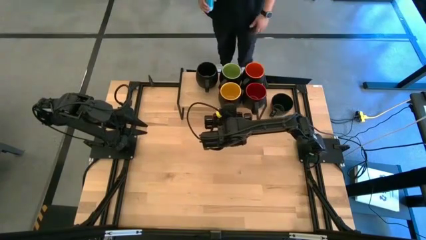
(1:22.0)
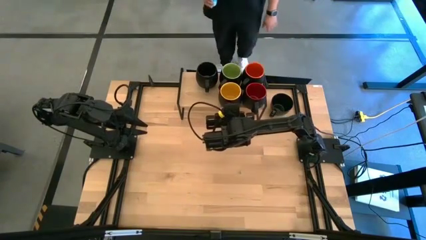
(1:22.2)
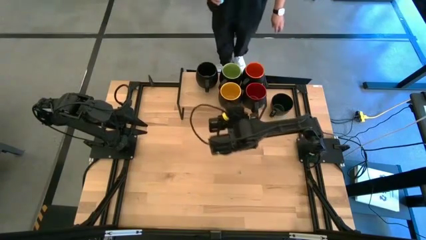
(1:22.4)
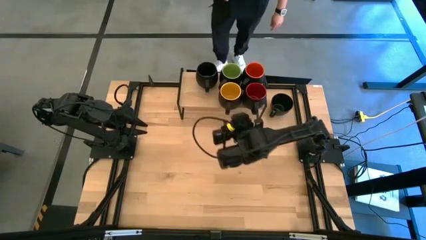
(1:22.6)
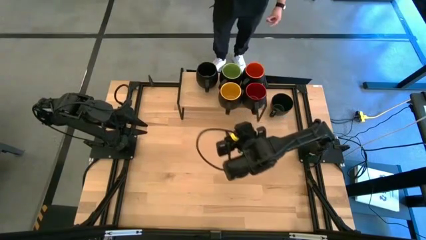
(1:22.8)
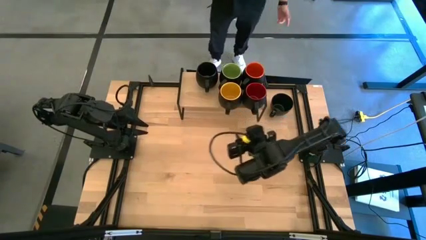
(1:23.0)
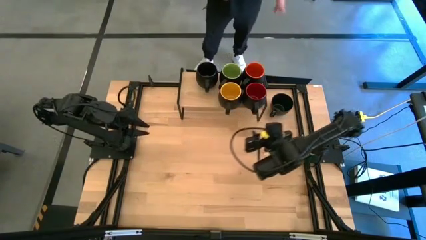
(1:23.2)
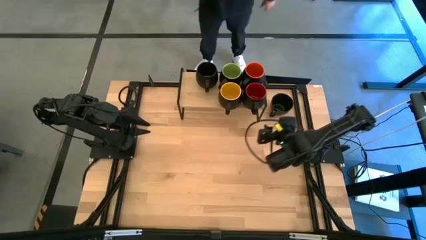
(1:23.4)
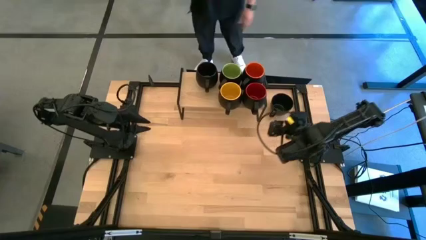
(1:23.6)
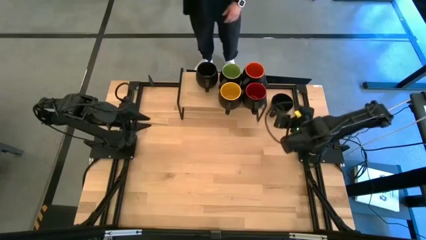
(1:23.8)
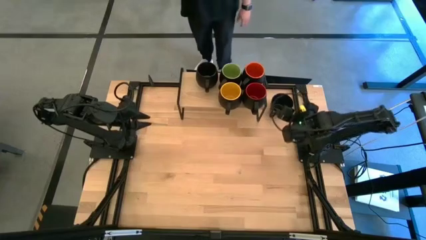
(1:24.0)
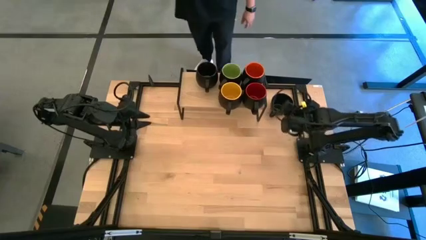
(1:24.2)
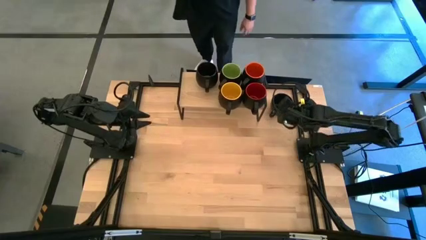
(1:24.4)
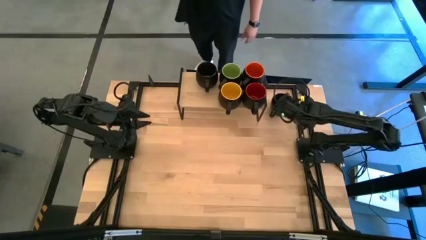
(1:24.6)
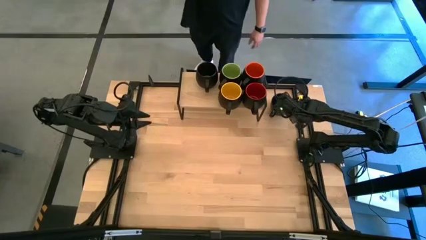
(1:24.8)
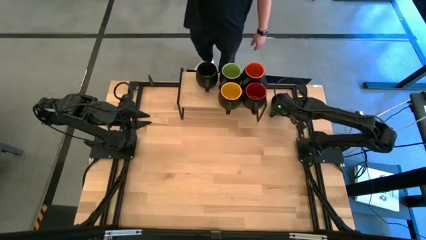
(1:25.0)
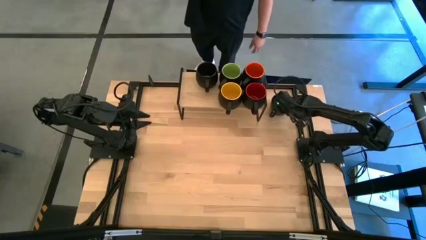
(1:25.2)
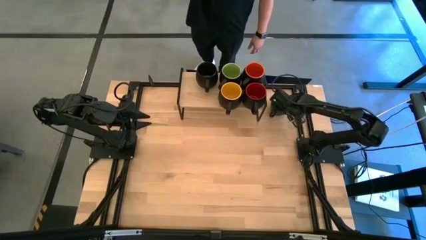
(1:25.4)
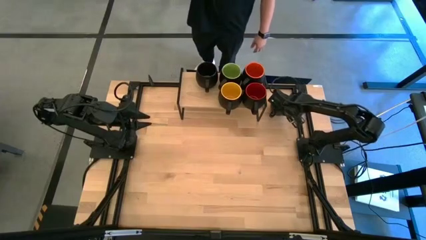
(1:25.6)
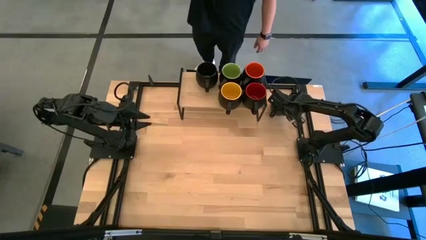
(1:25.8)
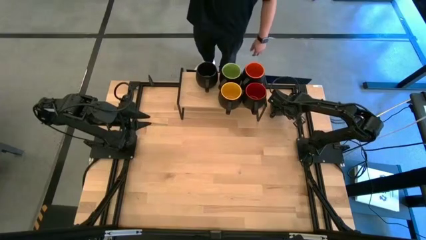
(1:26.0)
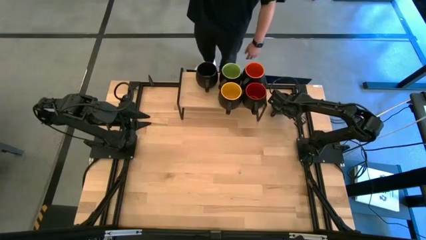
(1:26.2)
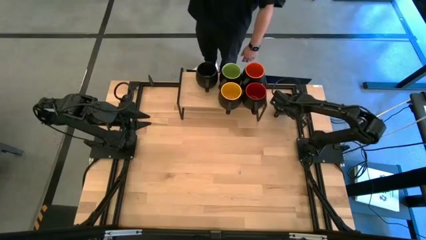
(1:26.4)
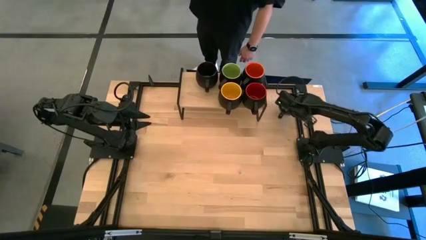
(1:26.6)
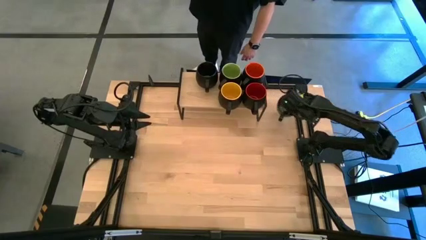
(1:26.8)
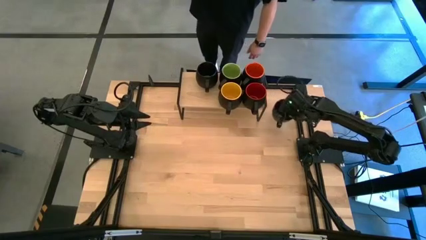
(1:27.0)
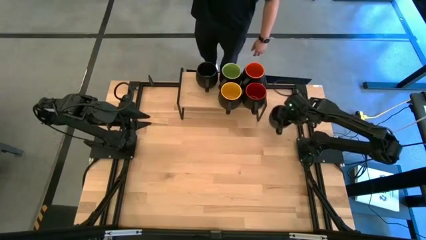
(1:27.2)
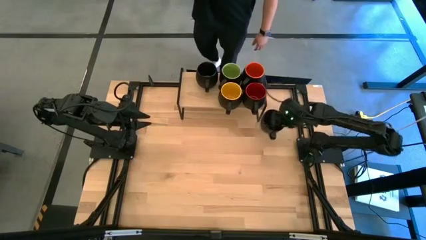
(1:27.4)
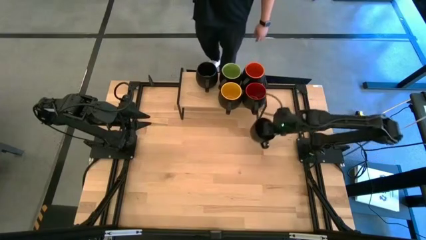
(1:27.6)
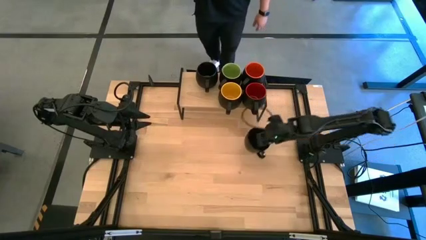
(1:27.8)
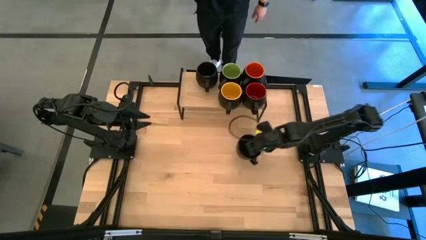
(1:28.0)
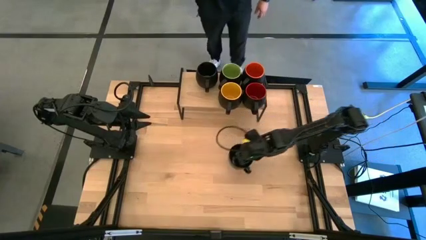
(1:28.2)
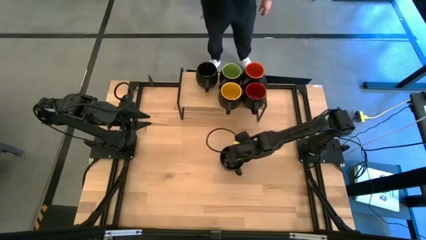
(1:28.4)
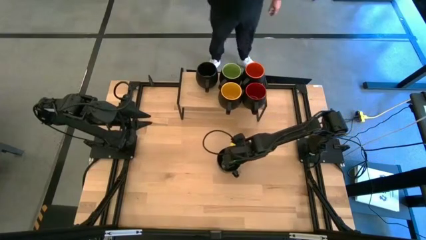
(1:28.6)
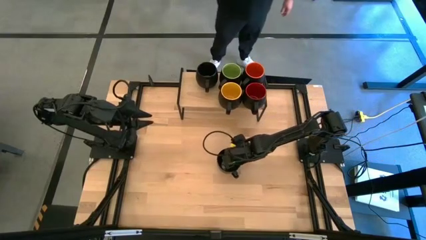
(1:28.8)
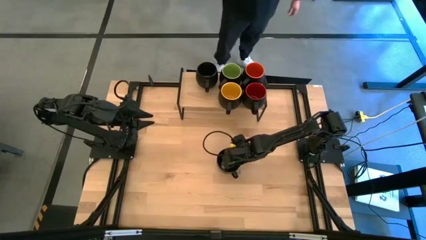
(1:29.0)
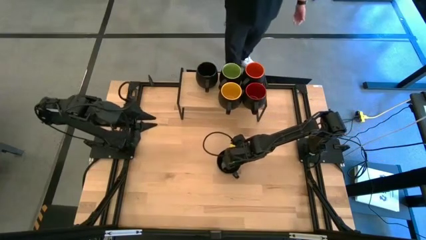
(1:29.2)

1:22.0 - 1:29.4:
Task: Place coffee mugs
Move the black mug to the center of the table

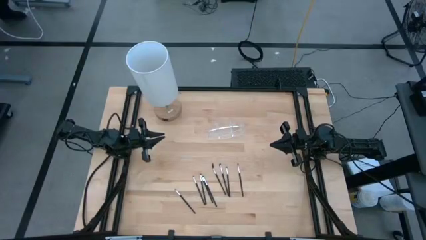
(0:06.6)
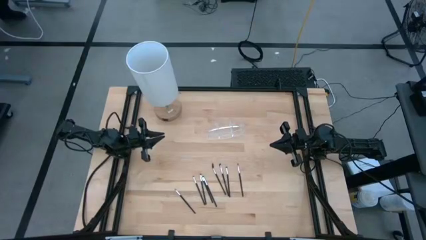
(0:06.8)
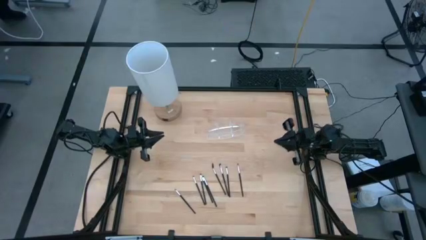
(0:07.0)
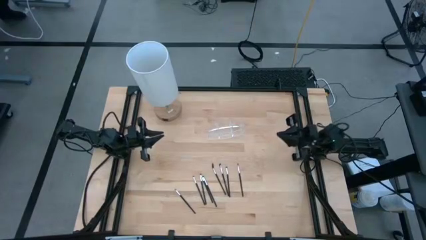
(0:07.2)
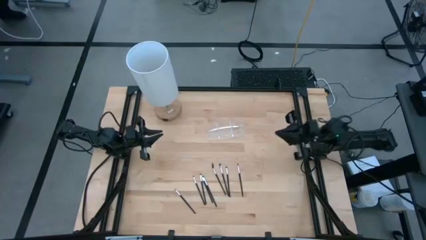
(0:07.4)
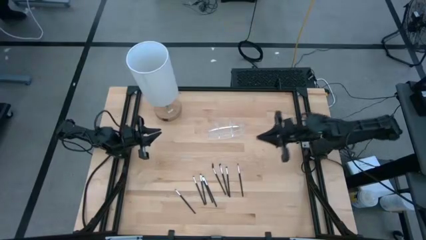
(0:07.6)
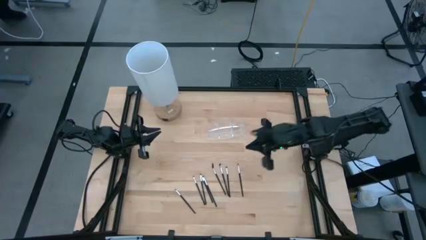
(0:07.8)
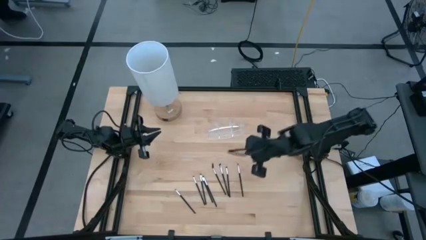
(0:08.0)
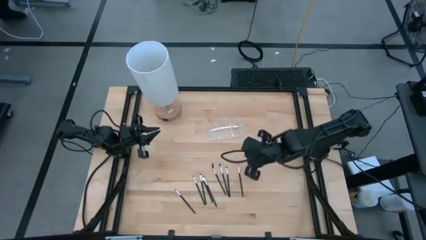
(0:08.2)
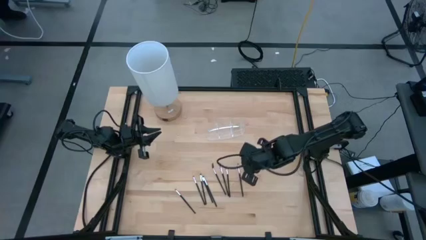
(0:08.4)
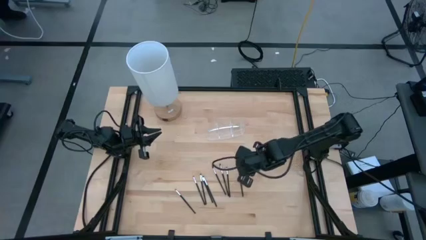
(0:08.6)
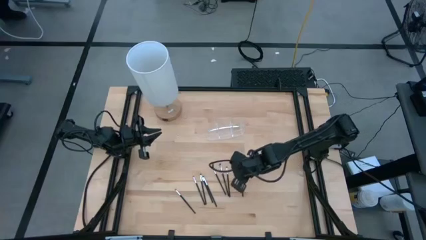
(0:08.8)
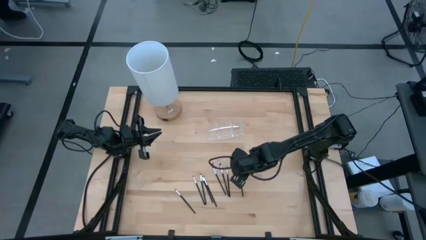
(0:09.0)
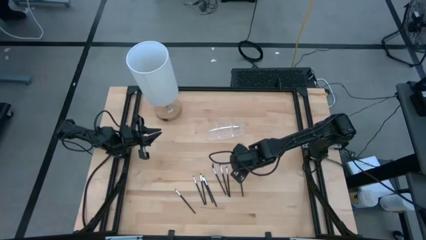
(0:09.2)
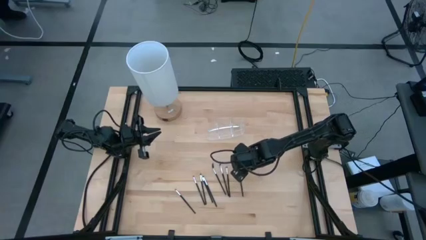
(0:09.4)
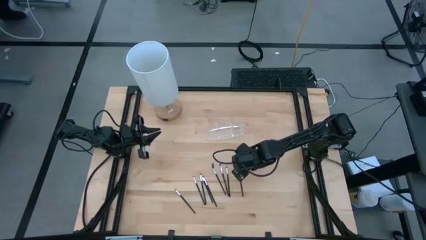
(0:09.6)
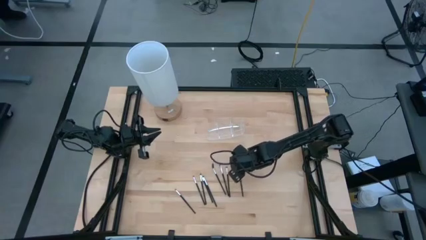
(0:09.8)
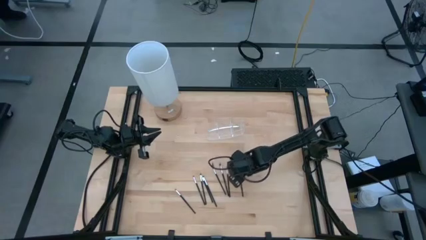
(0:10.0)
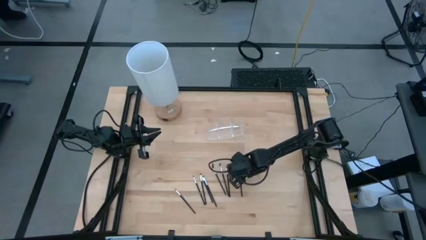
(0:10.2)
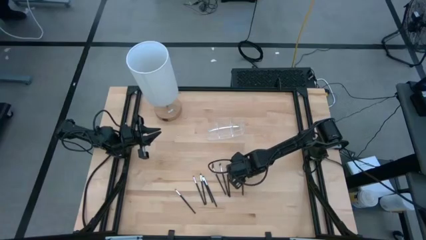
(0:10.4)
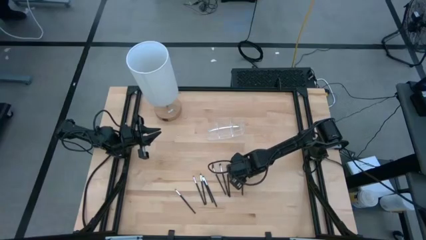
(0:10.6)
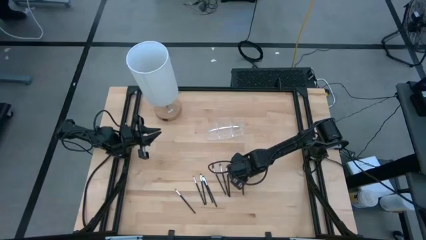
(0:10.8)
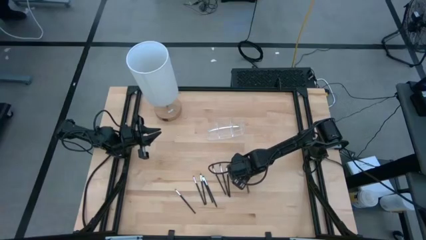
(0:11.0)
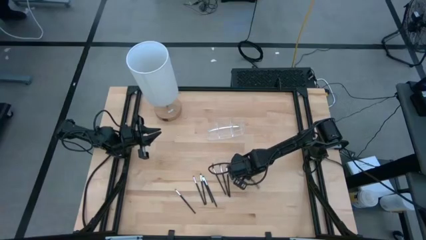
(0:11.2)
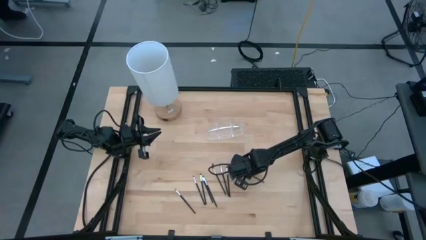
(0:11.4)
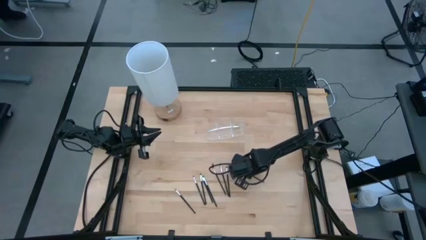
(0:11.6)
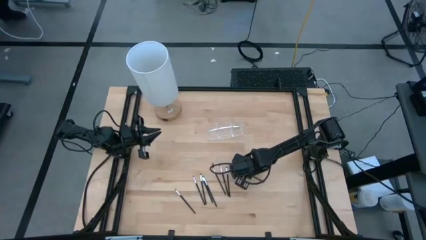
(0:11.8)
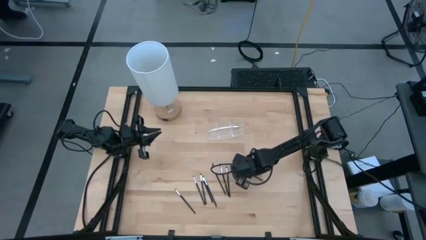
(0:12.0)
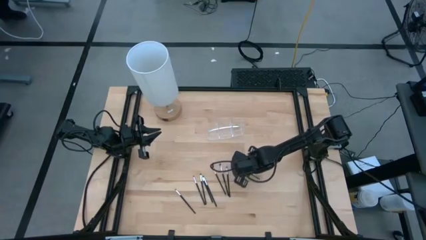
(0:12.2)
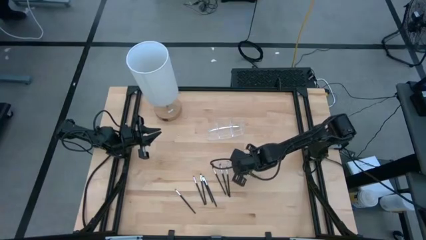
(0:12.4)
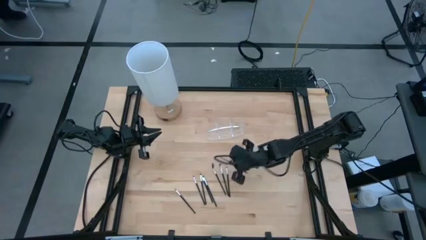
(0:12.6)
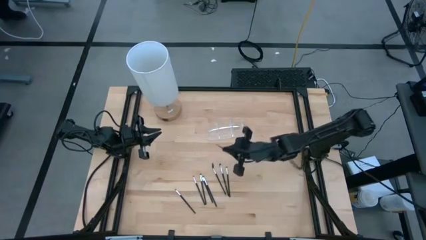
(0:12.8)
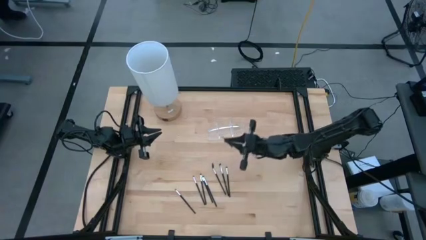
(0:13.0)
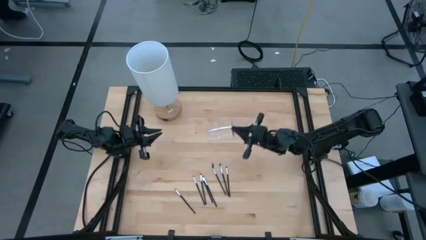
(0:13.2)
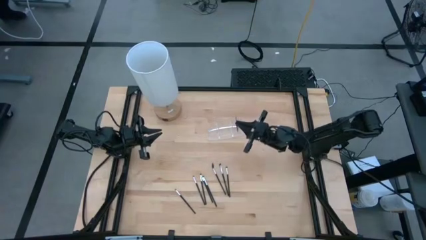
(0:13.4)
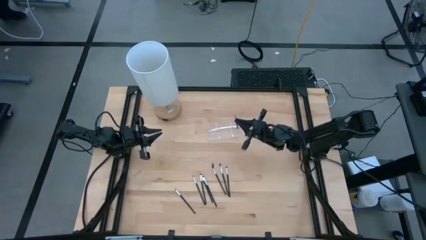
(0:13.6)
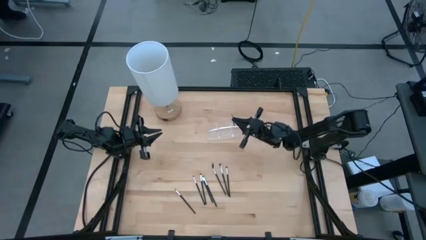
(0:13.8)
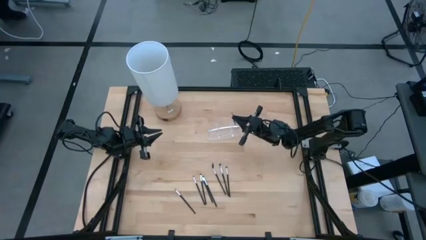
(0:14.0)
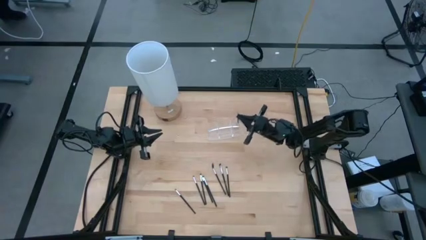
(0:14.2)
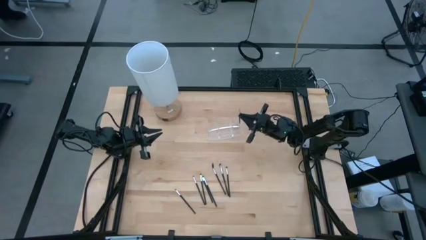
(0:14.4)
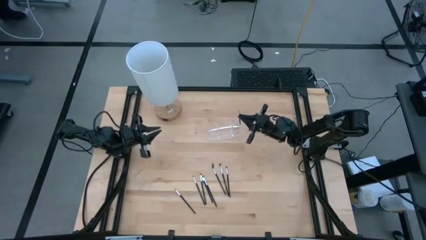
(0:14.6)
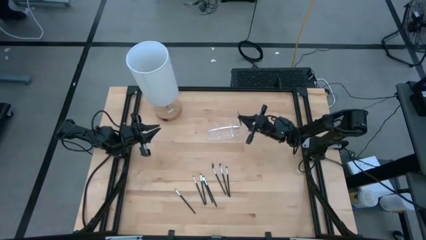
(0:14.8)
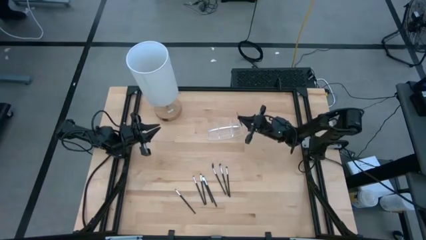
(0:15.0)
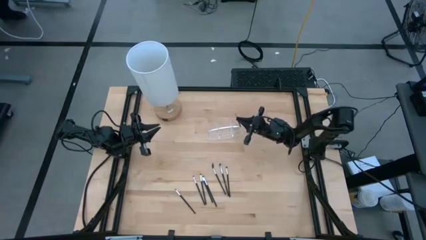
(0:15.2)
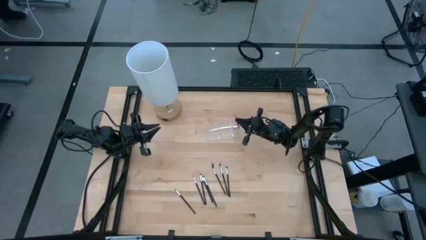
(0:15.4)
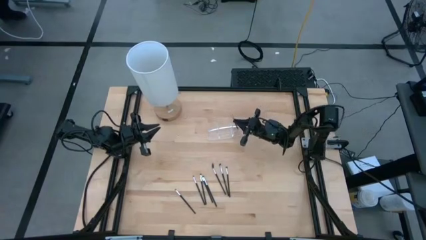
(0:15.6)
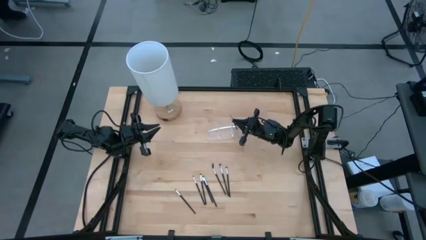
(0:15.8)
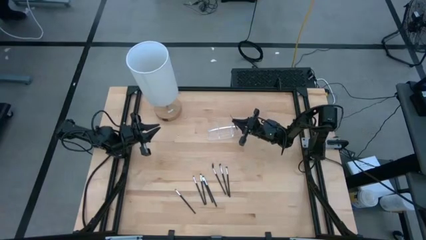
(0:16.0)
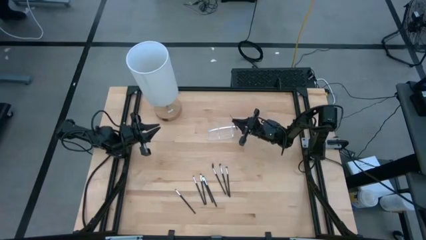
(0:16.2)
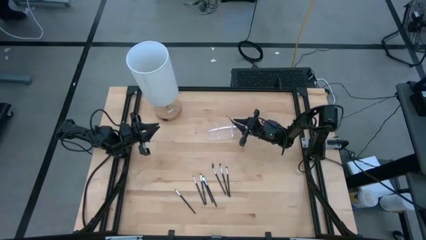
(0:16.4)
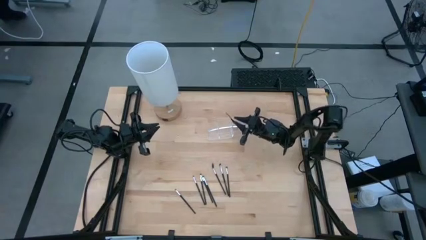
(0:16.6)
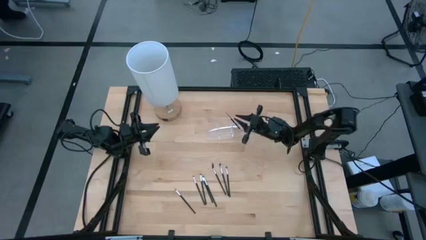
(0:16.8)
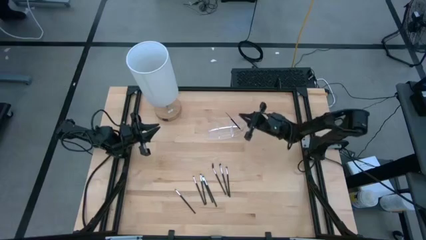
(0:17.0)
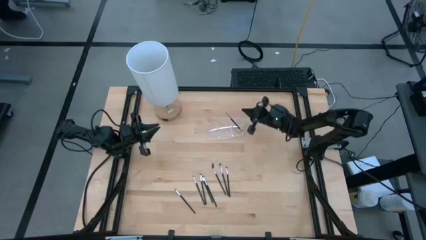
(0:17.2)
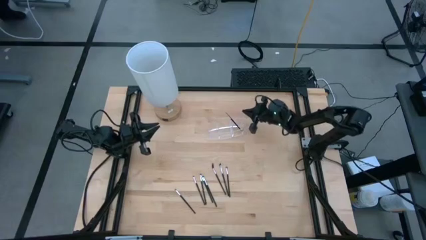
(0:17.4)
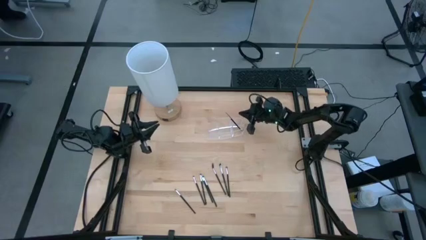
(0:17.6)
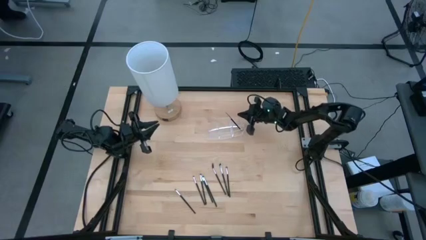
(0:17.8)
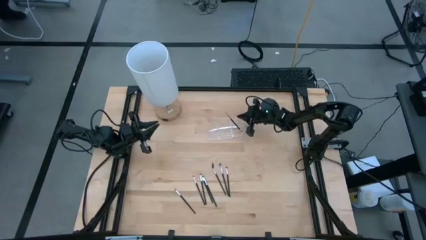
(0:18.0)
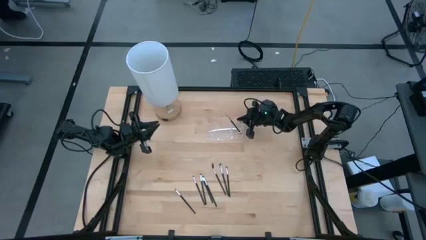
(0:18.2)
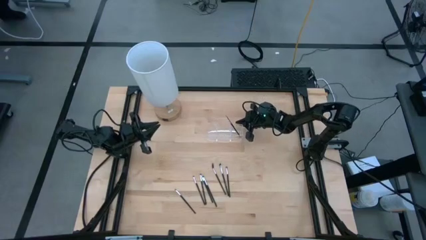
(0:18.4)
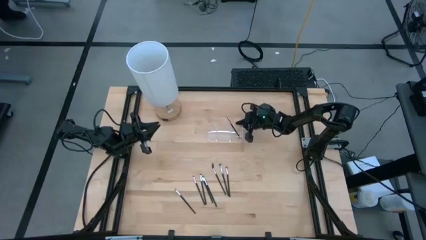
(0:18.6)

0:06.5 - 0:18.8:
Task: Put items in baskets/containers
Put the black eyeshadow brush into the transparent organizer
